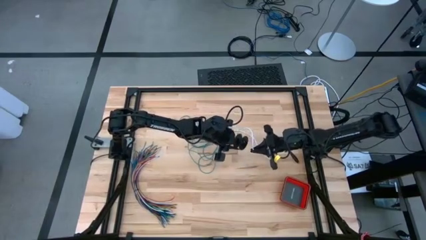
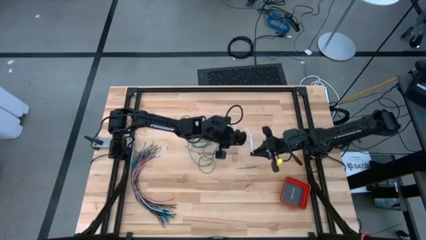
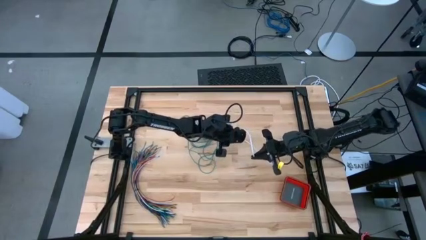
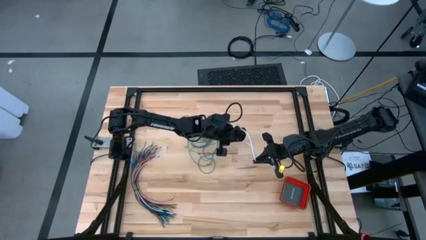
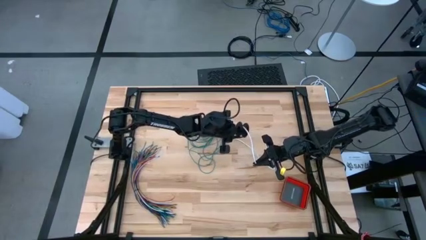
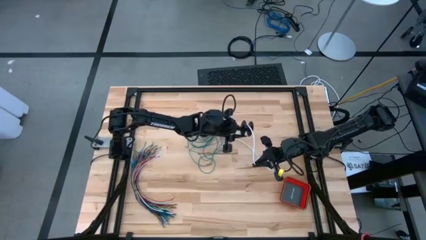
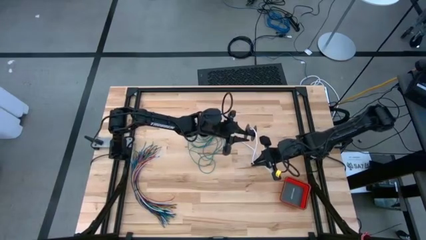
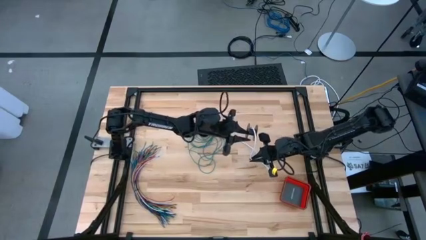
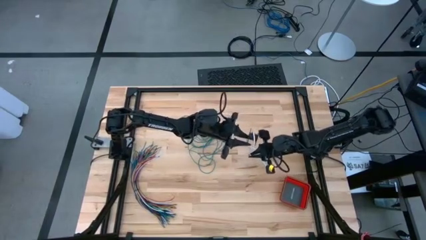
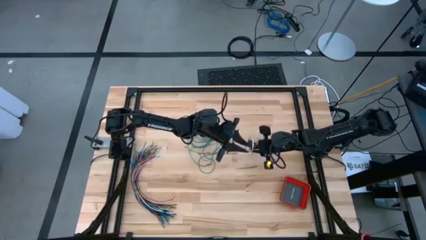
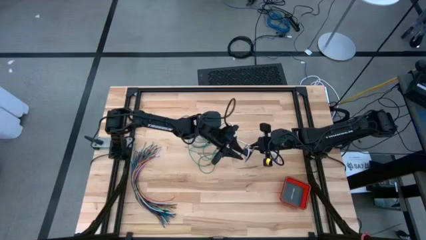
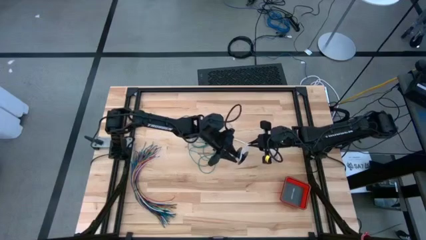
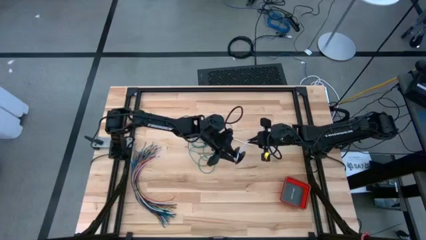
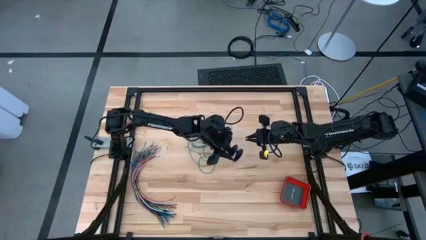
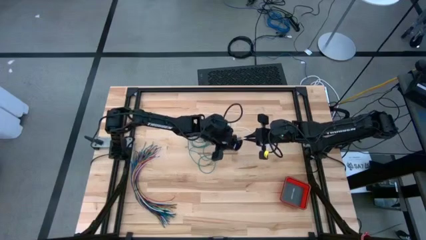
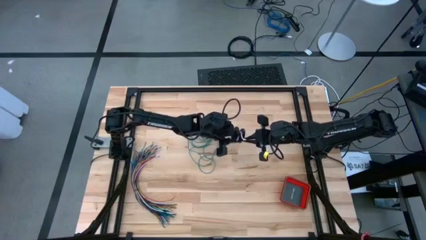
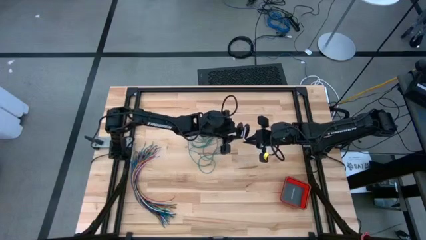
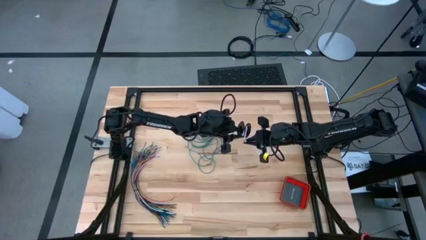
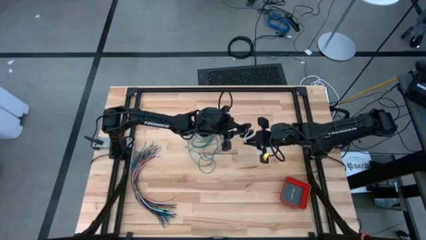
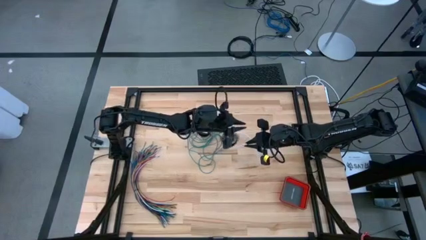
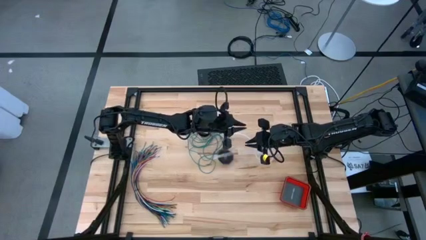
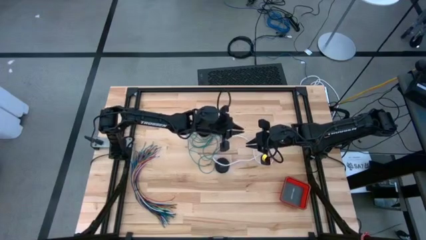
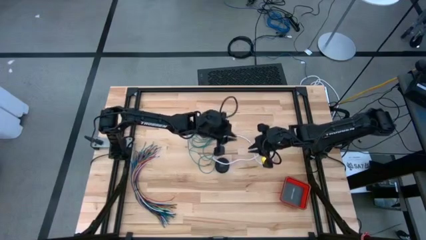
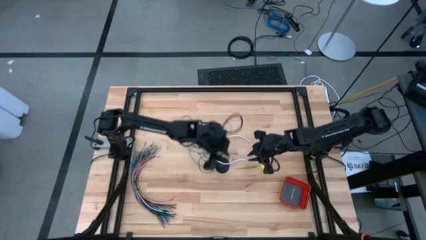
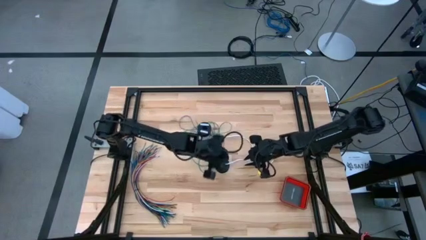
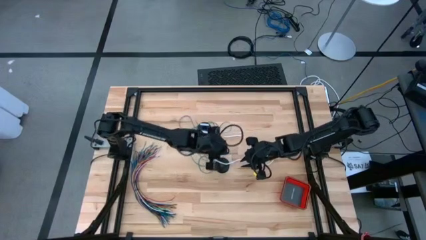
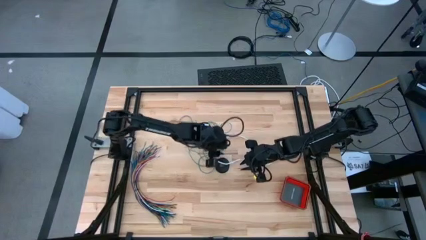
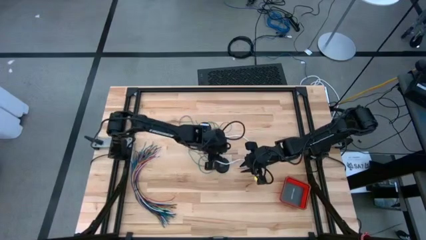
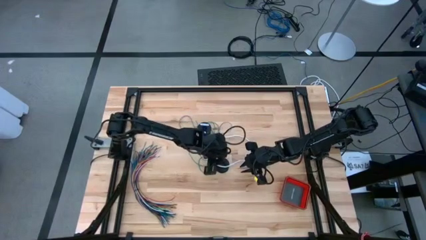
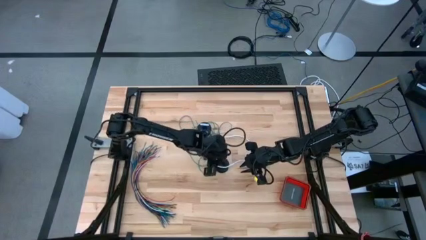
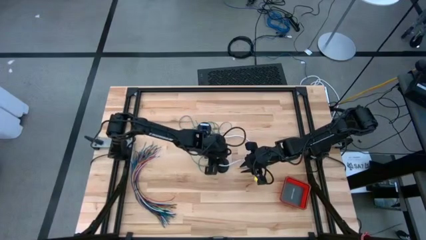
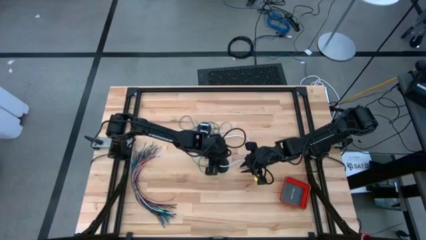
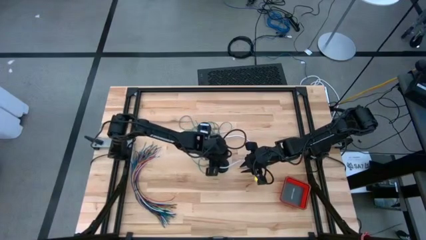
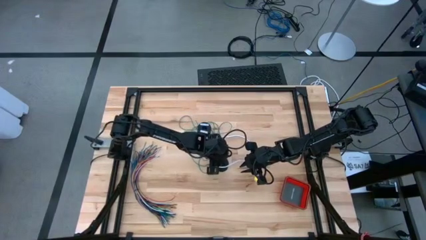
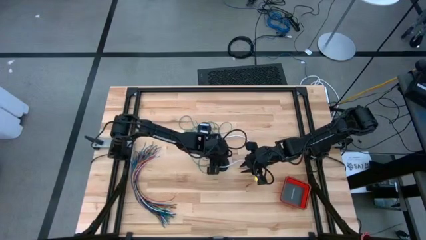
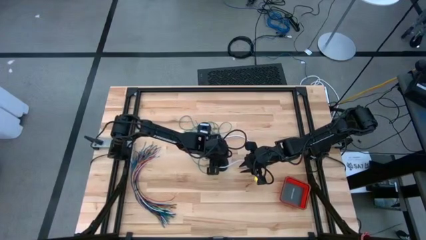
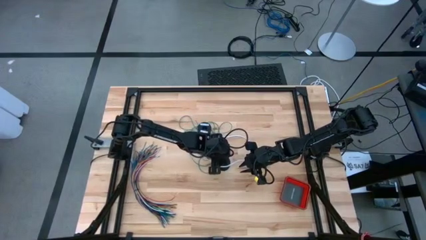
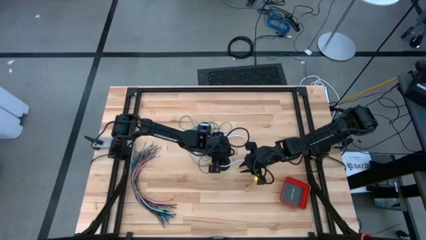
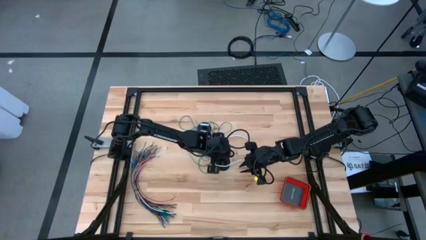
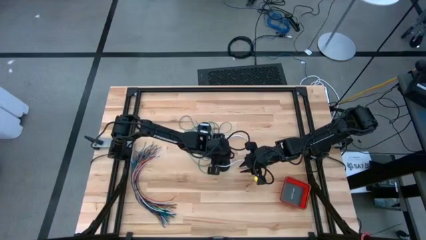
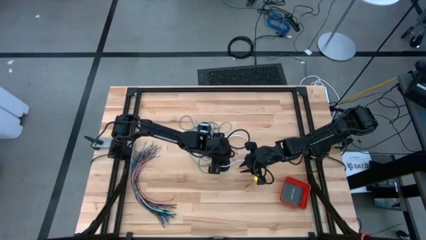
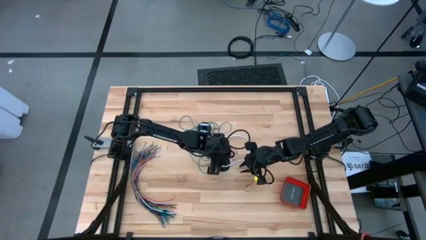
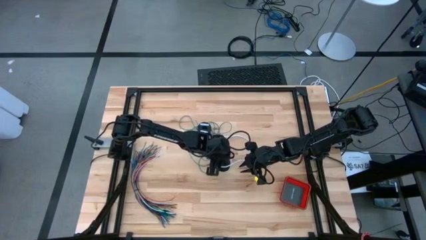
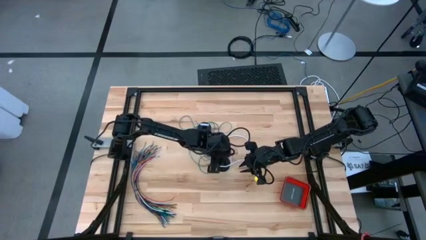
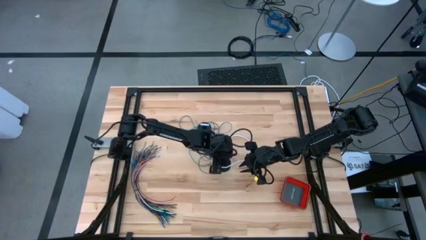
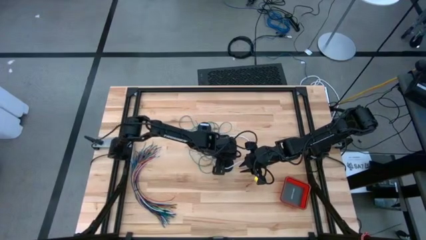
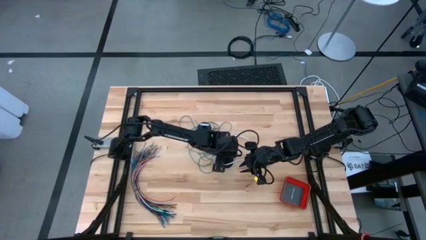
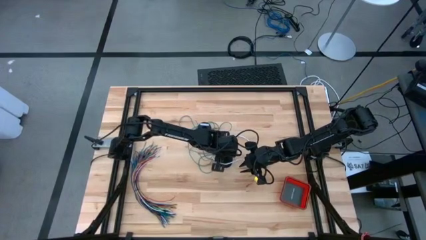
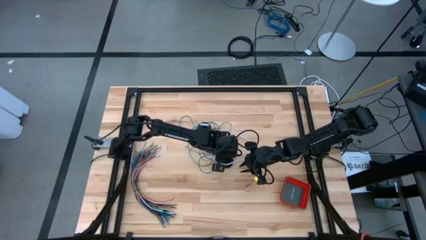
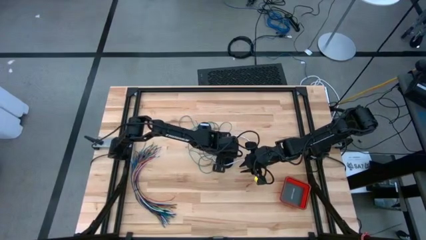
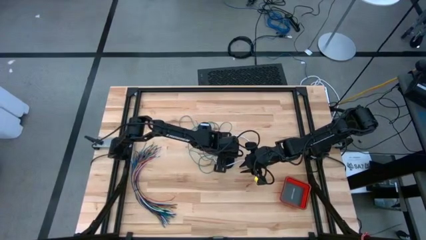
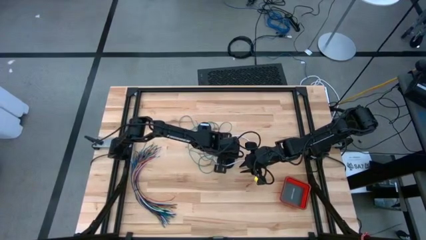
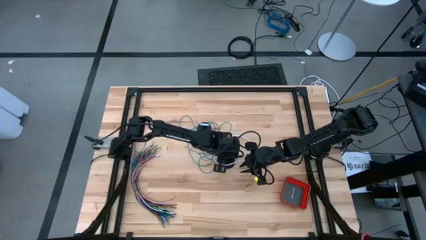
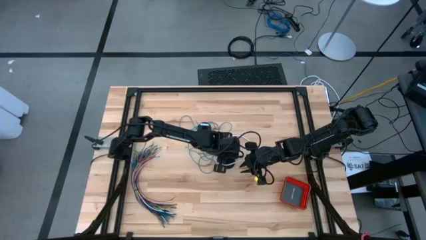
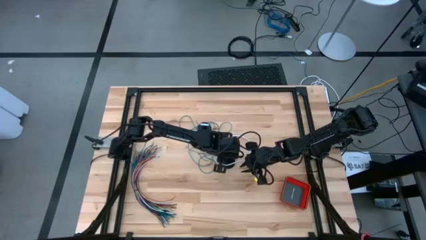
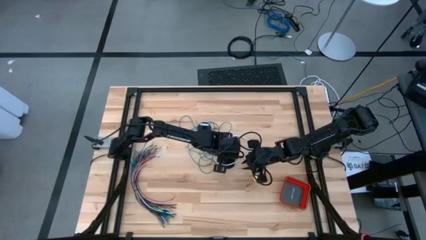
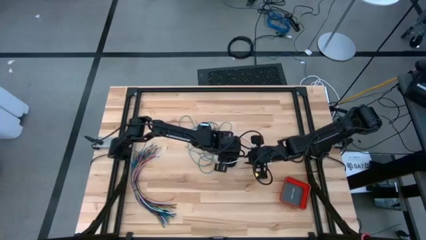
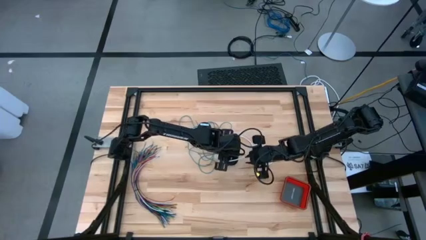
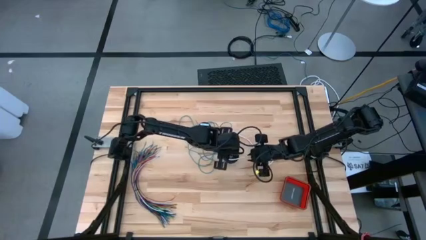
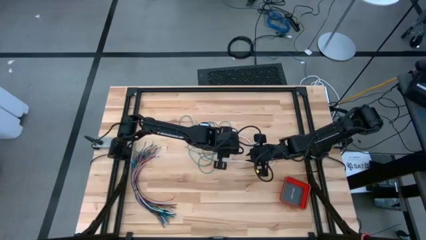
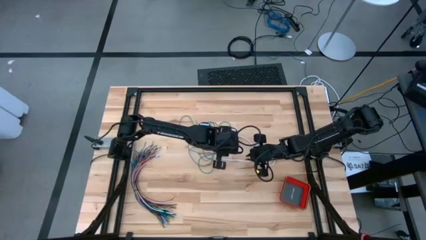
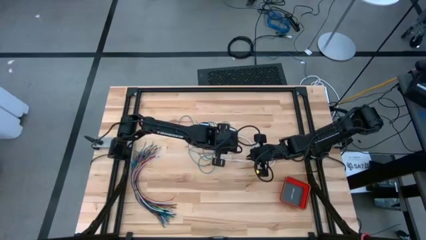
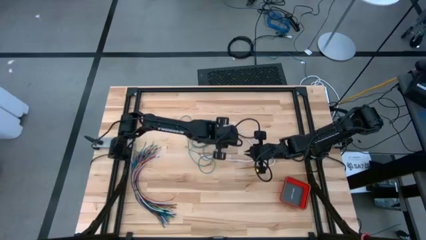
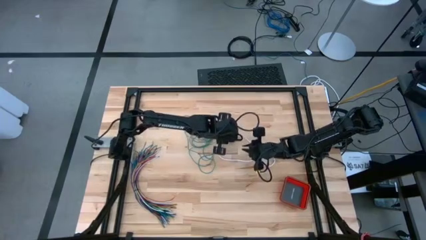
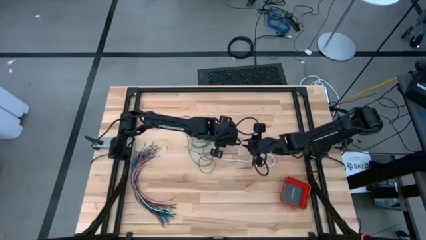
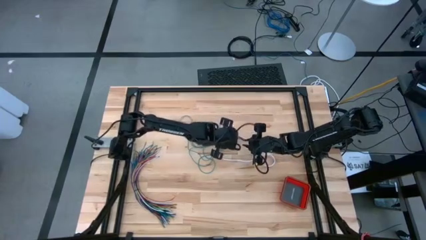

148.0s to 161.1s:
Task: Coil cords
Coil the white wire onto the spool

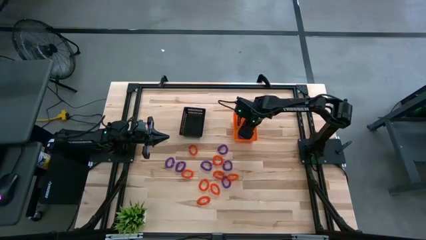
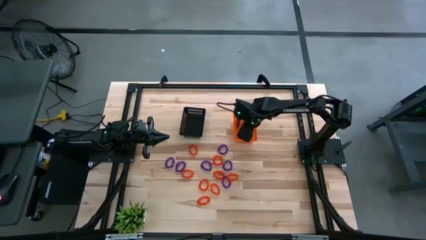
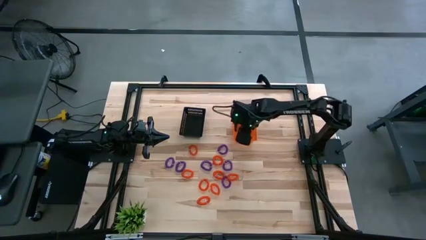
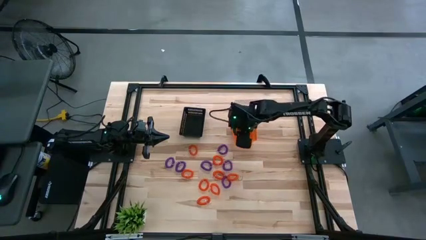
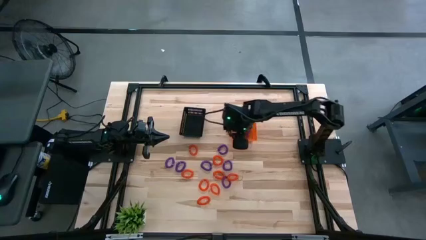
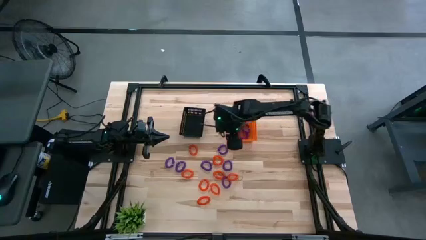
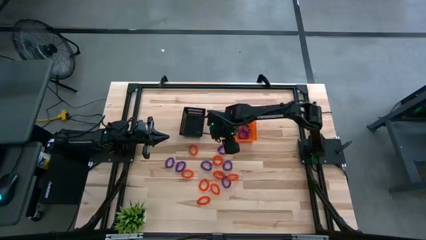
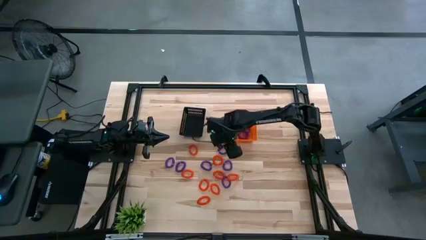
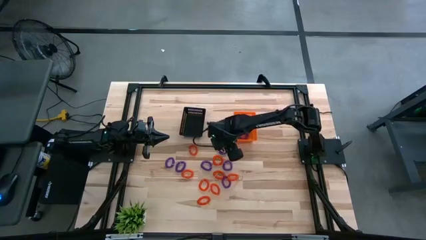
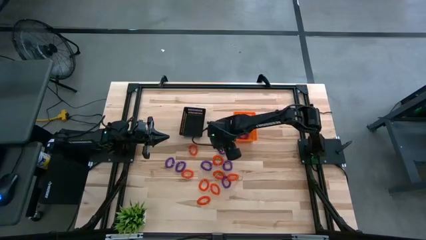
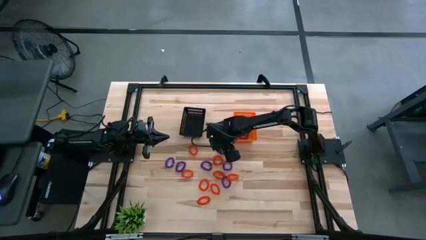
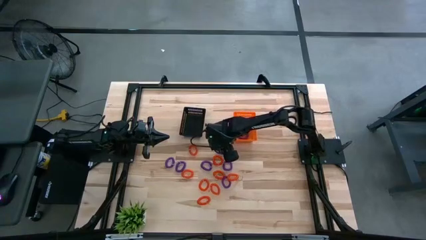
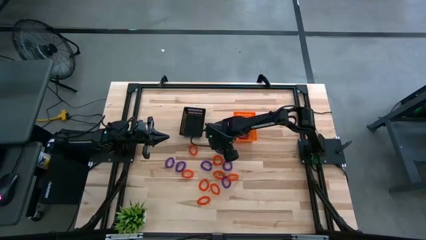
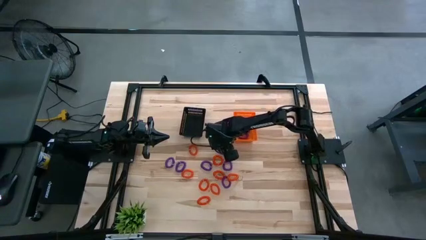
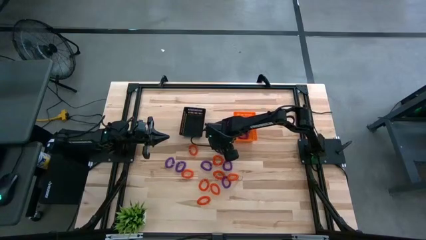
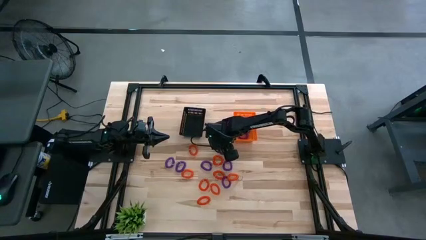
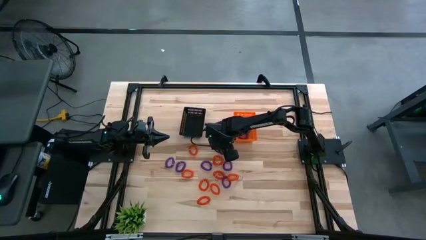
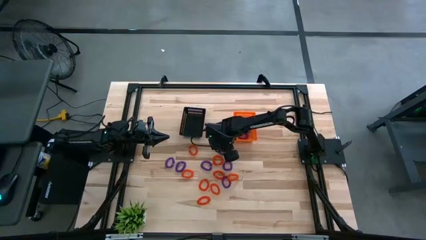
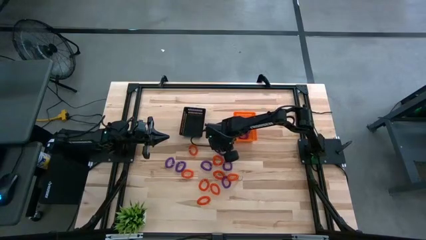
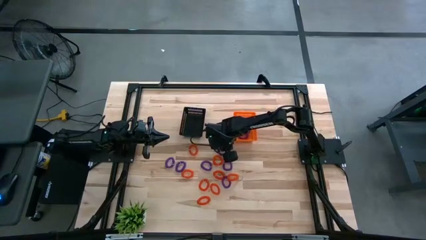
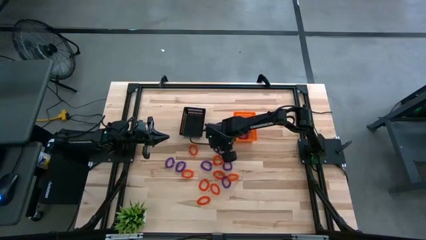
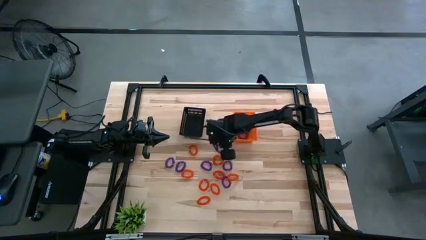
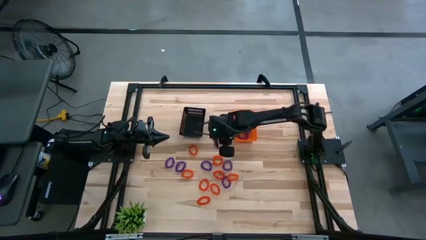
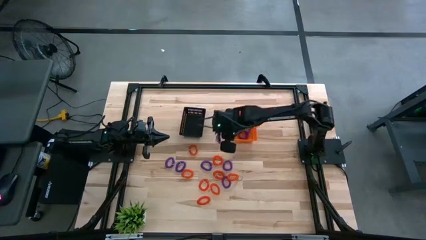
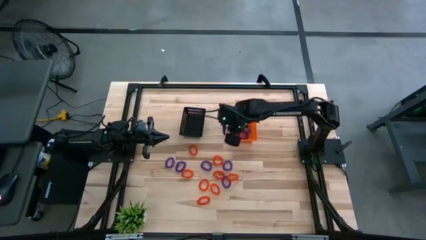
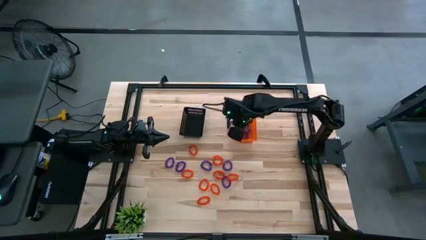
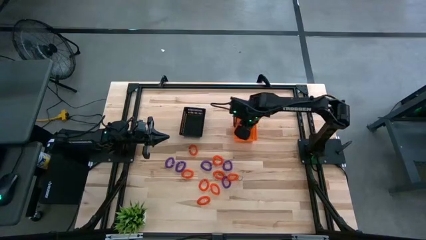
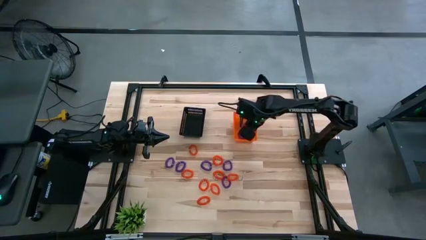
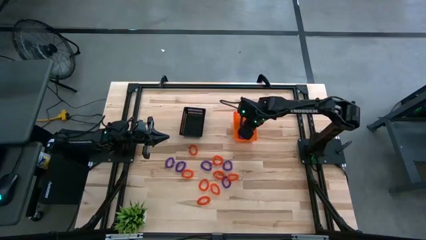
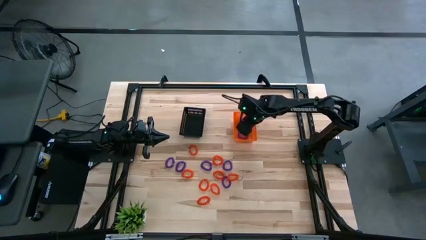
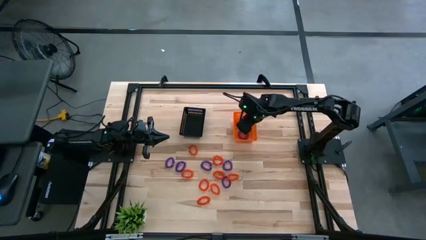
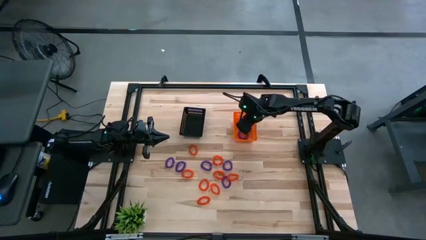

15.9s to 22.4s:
Task: Sort spring keychains into baskets
Put the violet spring keychain into the orange basket
